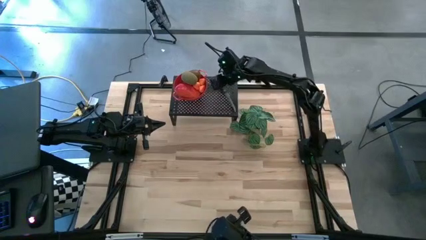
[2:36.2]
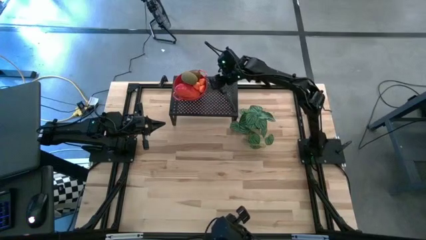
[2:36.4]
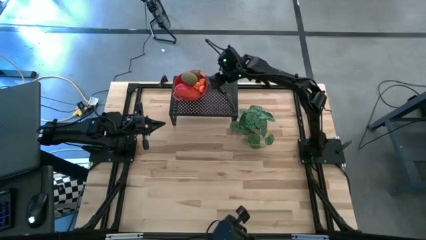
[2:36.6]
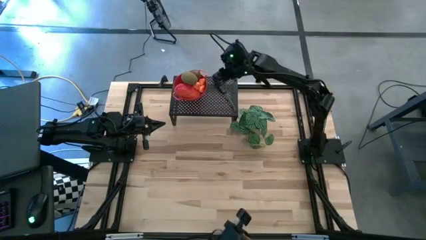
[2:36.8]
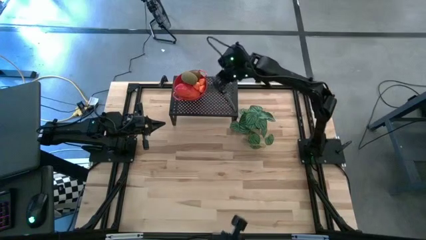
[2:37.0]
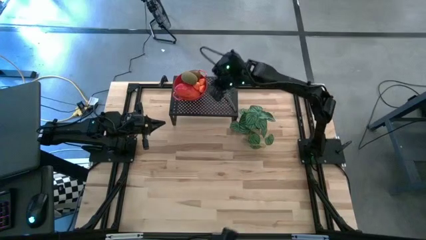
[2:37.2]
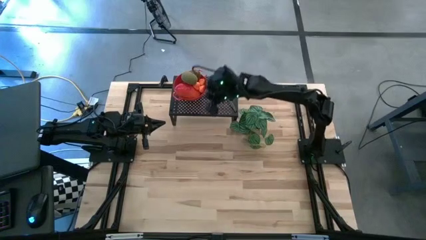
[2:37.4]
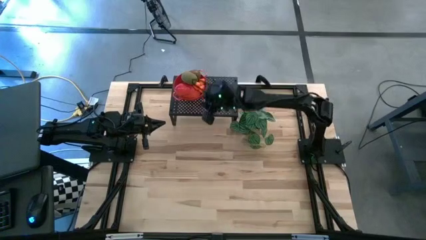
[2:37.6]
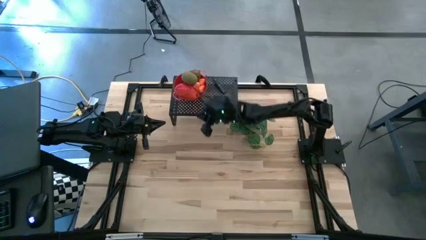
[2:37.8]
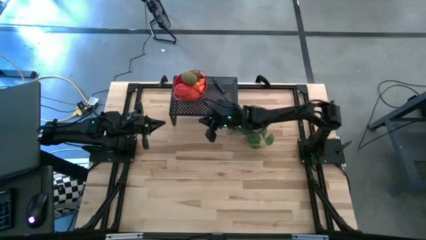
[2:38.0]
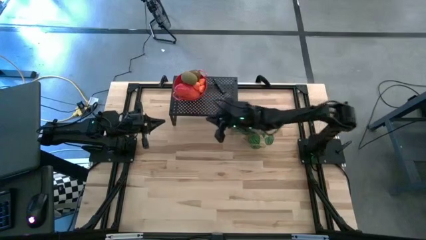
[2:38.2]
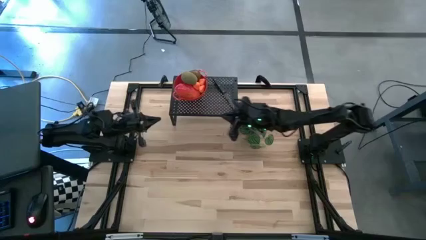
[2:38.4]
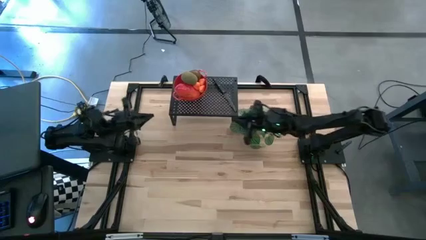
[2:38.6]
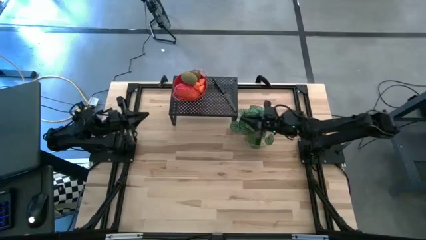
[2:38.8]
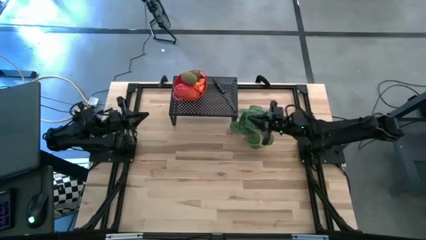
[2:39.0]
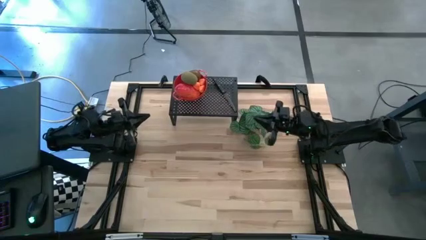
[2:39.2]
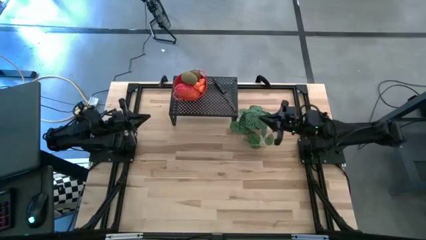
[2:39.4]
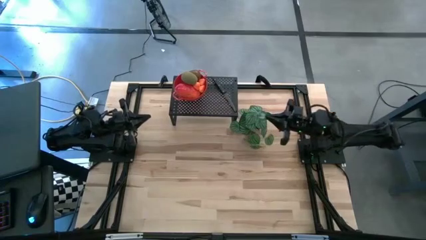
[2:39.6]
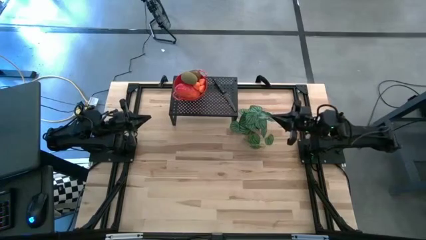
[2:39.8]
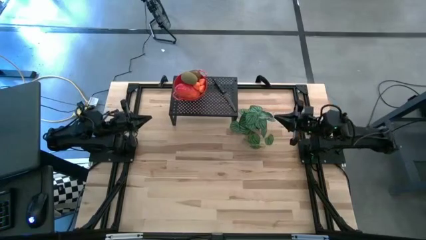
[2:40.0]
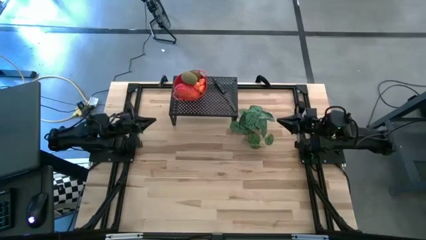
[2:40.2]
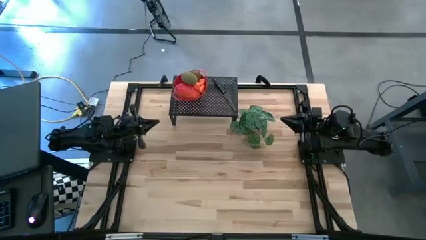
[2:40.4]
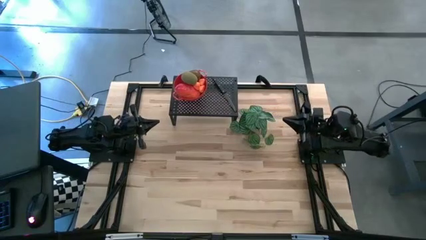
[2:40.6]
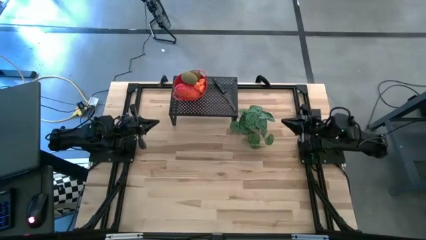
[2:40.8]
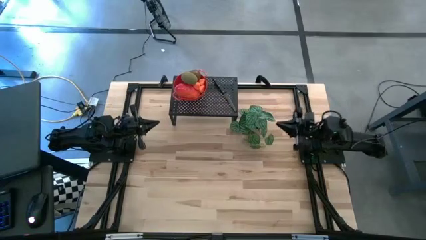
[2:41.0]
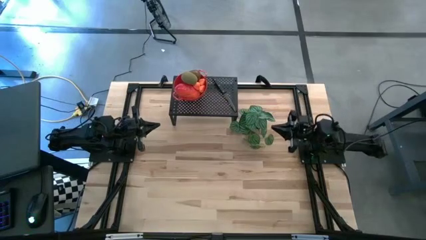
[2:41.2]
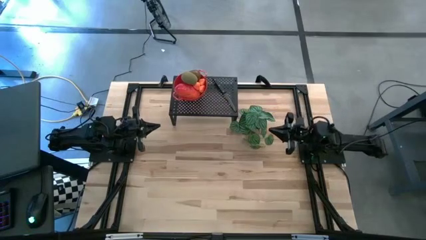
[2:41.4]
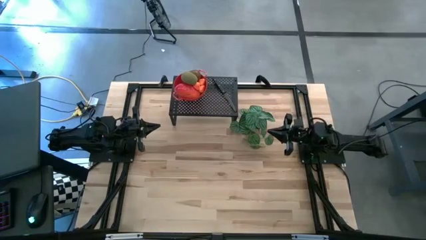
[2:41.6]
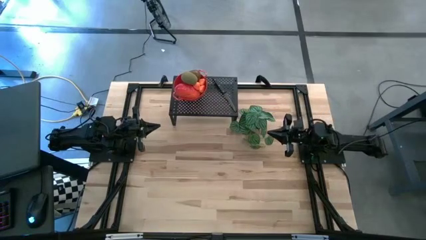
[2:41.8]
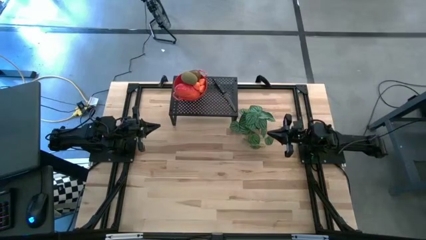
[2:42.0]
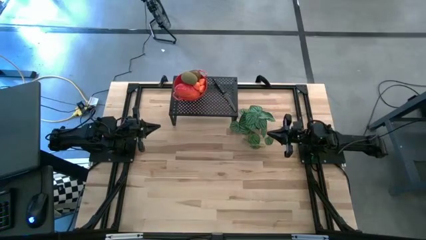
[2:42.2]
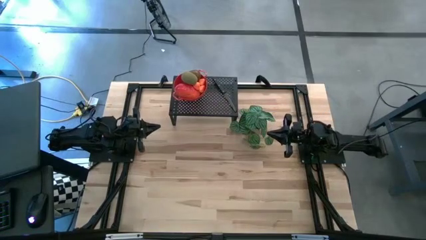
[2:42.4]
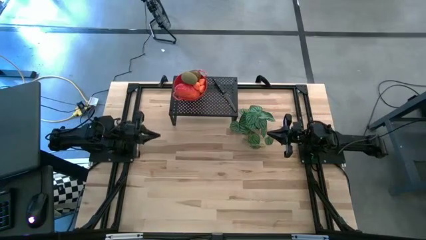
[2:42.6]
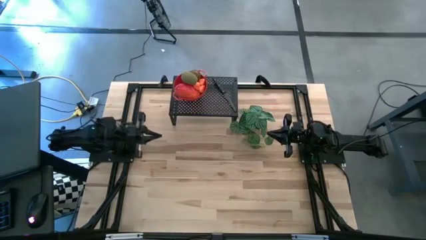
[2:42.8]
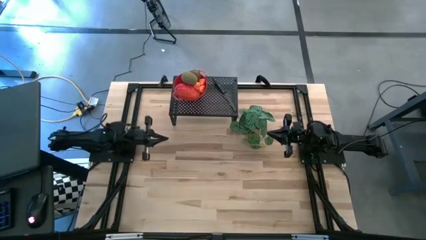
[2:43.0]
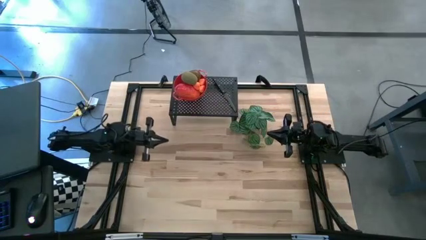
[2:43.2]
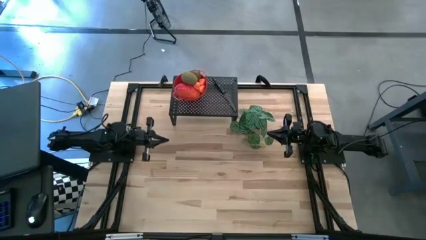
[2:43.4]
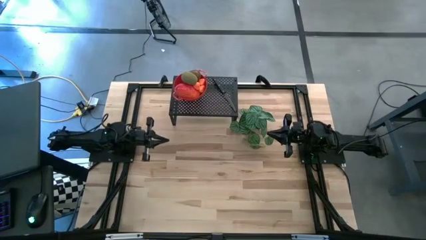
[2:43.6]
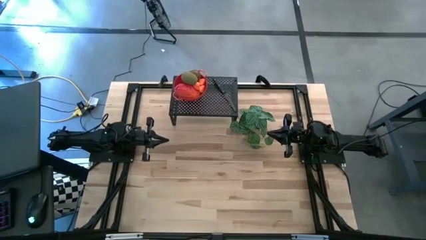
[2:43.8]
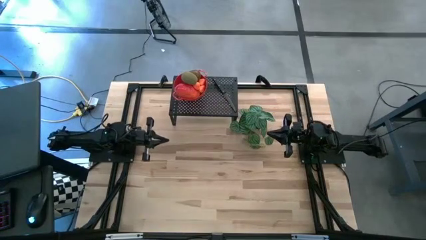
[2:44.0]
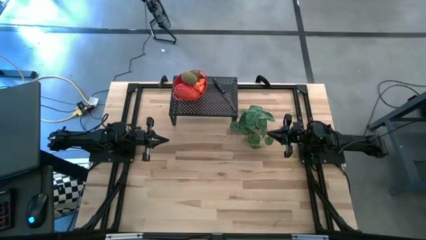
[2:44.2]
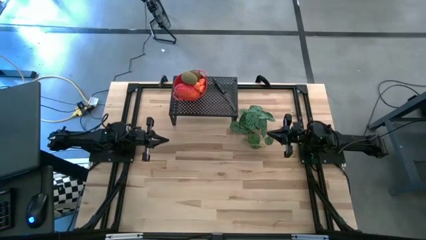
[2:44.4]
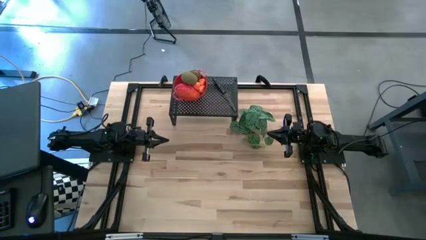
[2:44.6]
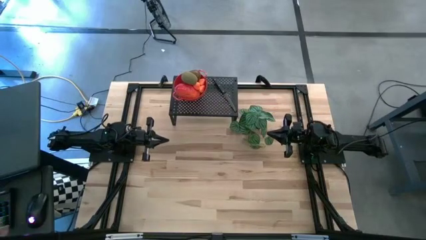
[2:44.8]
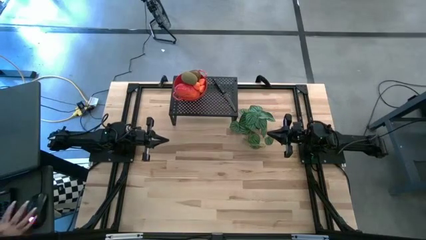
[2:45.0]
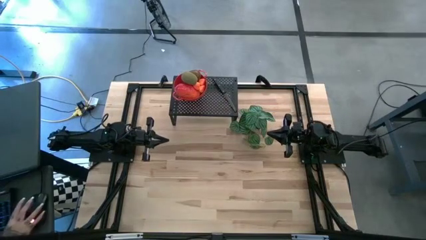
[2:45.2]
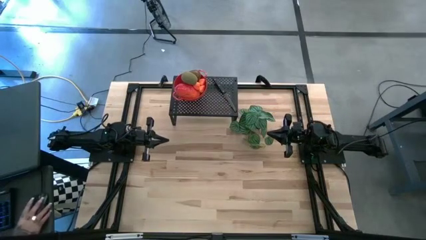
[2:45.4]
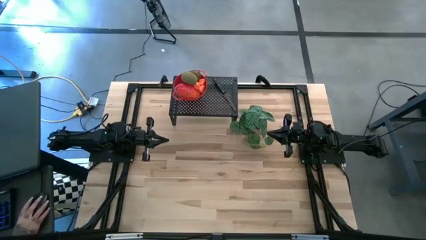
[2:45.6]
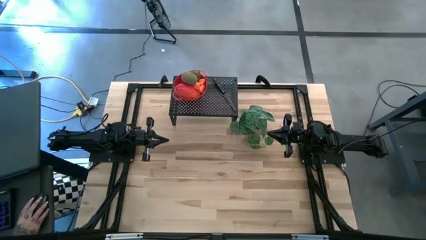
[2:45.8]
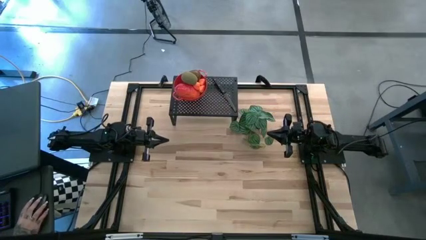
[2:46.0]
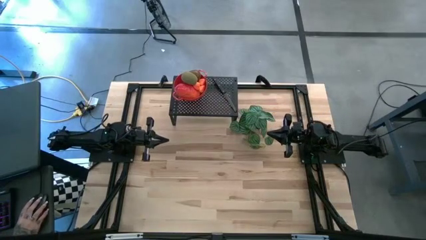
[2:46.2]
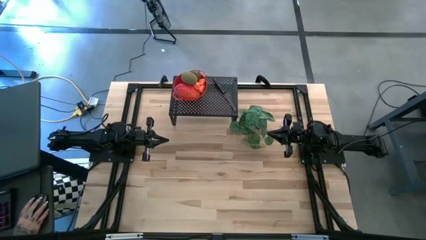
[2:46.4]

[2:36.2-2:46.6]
Task: Pick & Place Fruit
Return to Home Position

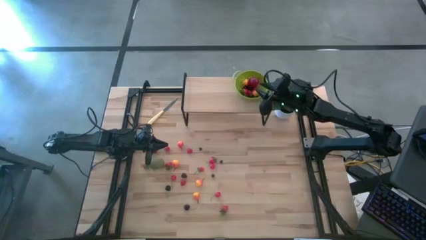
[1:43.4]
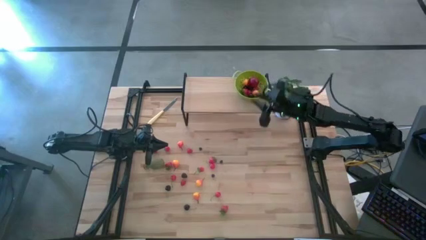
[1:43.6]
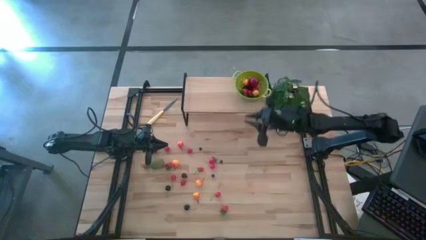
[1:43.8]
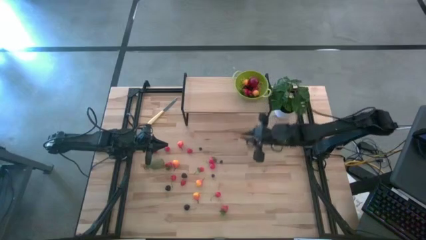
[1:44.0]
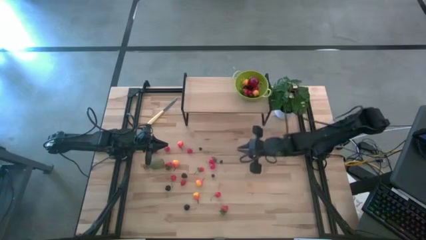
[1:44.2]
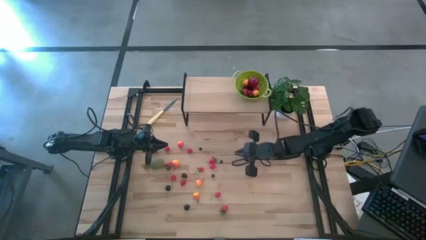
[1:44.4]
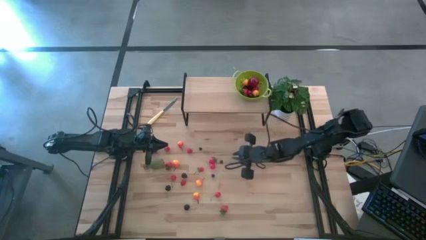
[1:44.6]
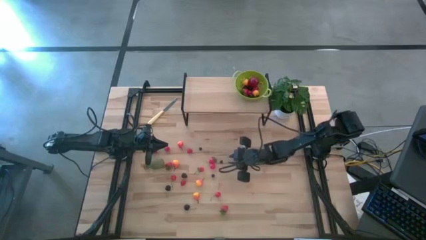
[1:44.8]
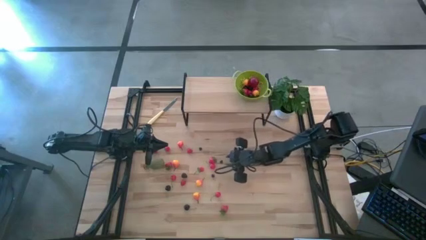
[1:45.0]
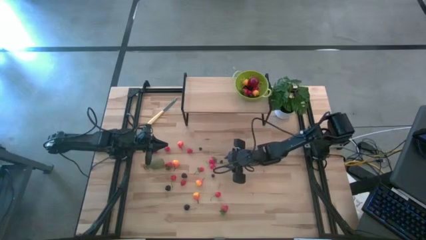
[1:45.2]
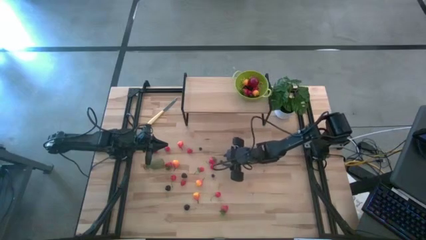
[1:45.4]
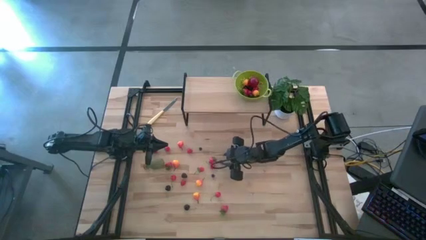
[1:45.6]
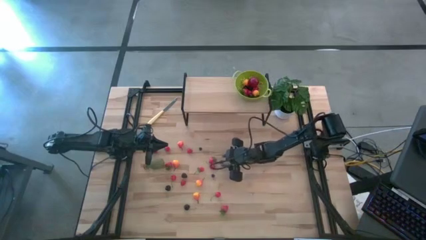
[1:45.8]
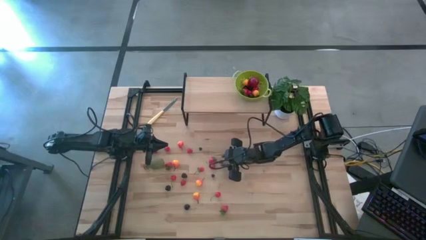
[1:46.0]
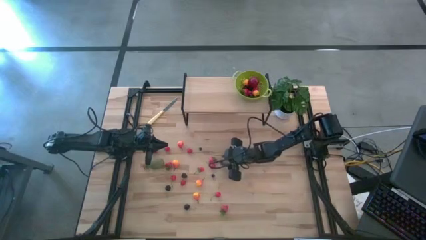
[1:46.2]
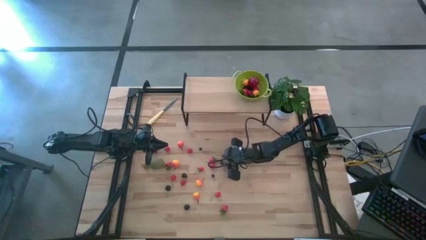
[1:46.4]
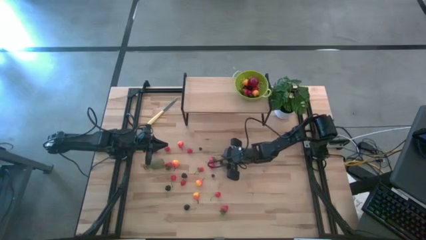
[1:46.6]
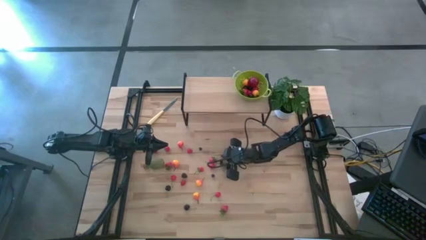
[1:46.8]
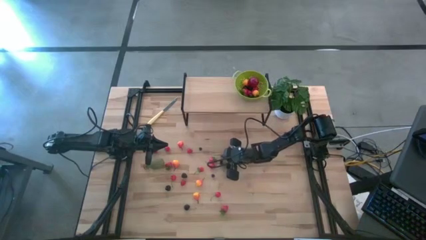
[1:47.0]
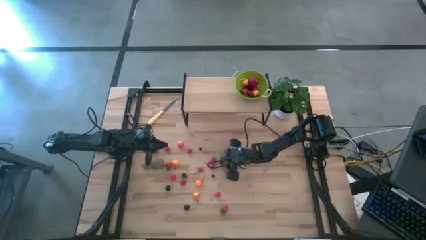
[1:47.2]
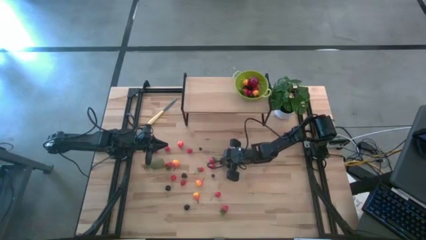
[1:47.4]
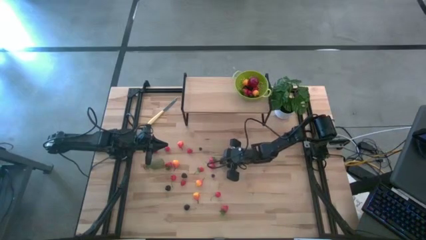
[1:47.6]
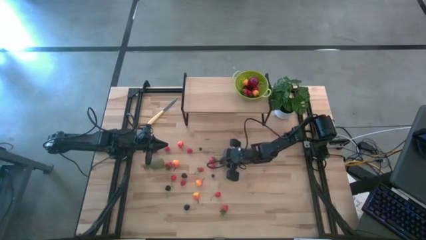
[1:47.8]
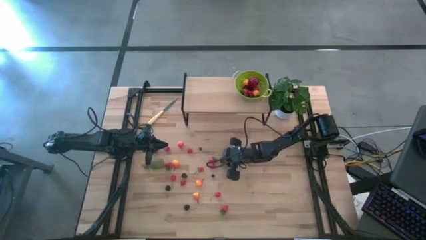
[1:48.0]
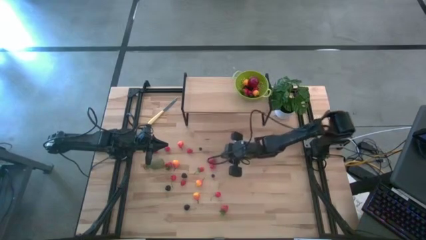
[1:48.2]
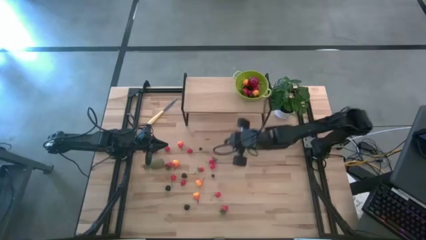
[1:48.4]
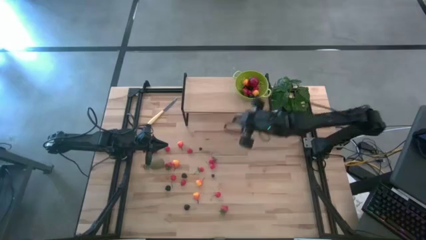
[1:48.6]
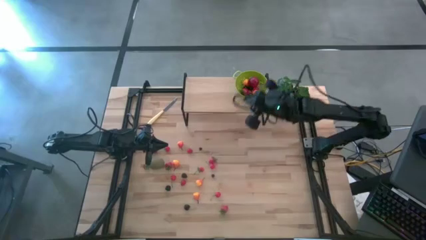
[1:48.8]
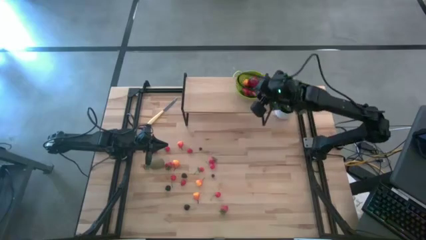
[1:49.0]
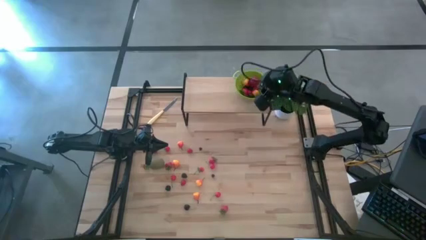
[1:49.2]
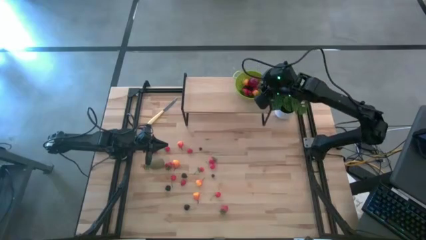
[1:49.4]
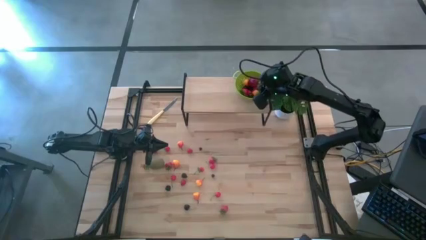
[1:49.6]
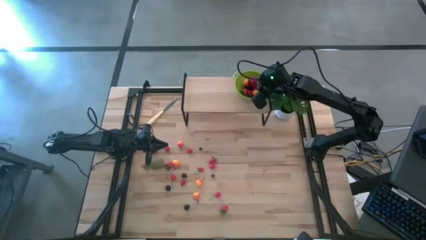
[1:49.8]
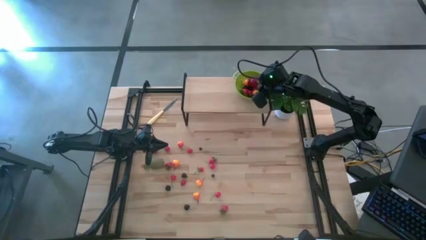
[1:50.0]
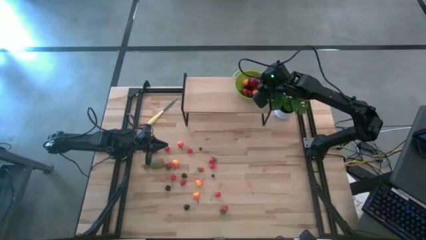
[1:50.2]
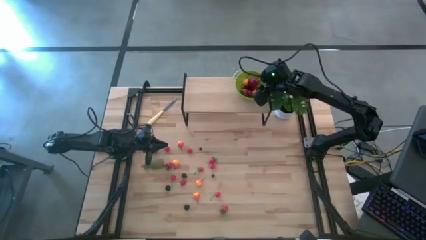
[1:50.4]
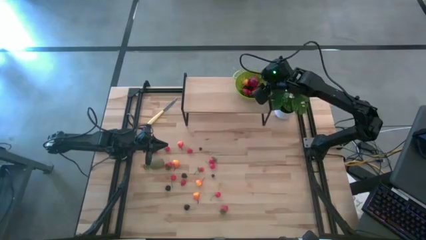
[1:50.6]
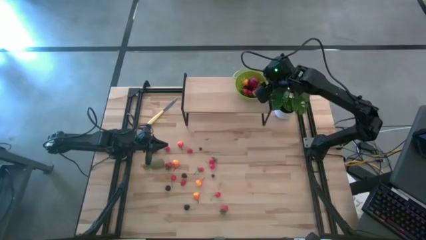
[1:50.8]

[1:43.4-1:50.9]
Task: Build produce basket
Put the blueberry into the green basket
